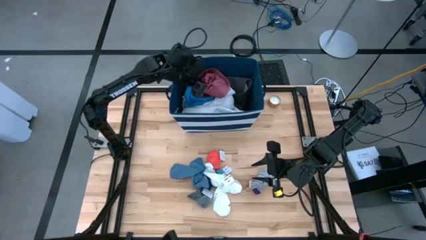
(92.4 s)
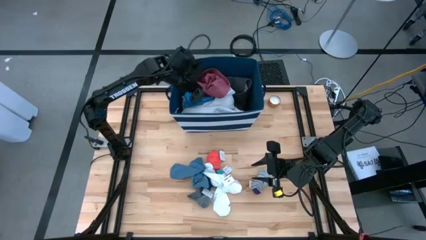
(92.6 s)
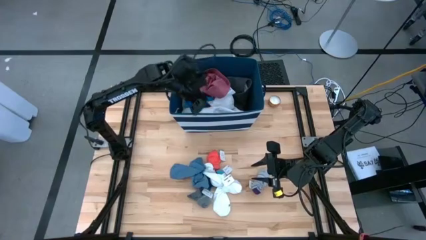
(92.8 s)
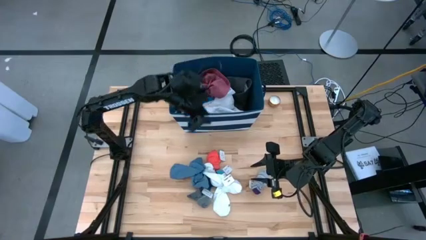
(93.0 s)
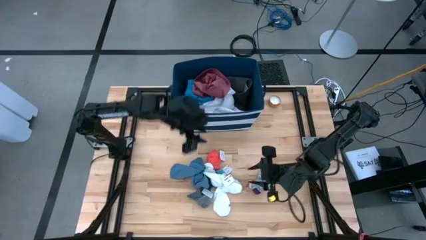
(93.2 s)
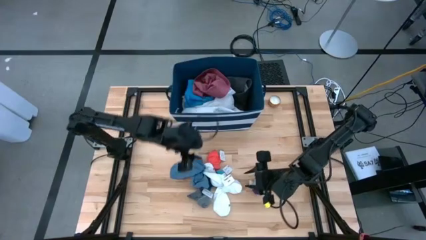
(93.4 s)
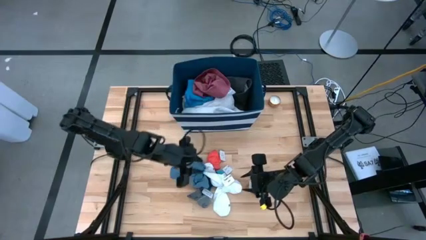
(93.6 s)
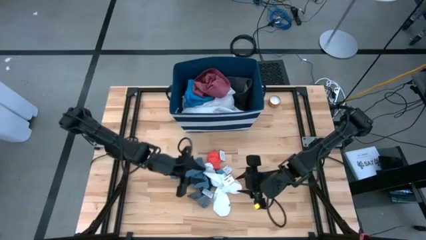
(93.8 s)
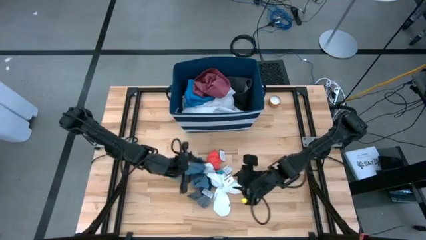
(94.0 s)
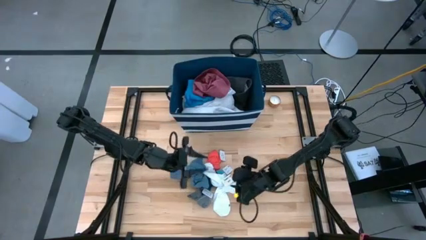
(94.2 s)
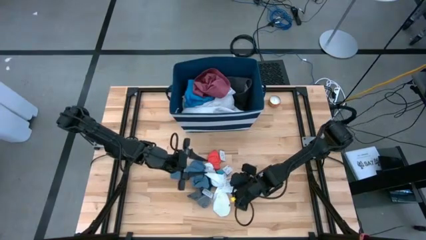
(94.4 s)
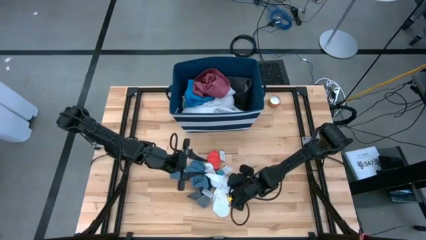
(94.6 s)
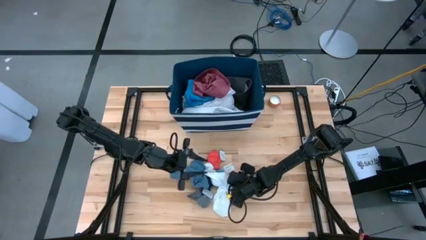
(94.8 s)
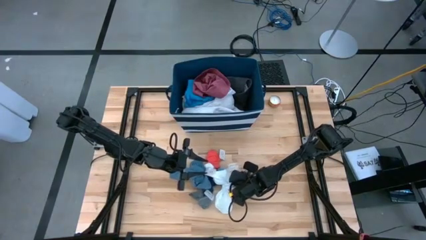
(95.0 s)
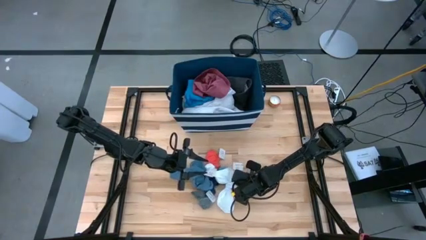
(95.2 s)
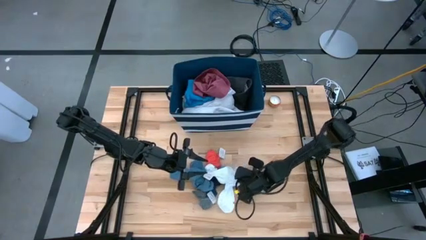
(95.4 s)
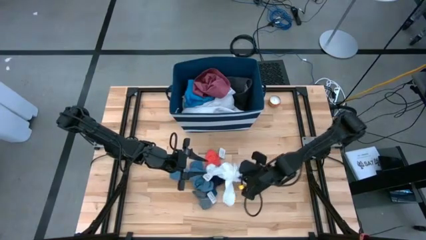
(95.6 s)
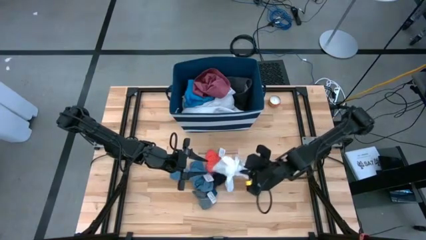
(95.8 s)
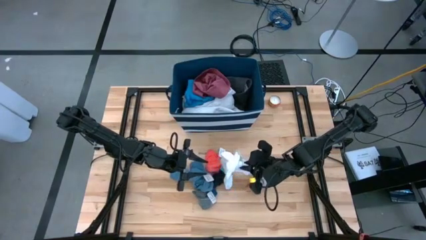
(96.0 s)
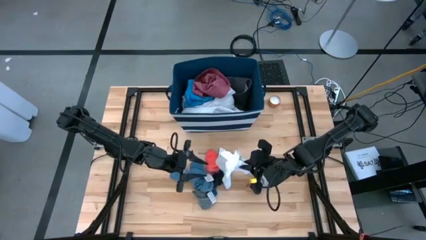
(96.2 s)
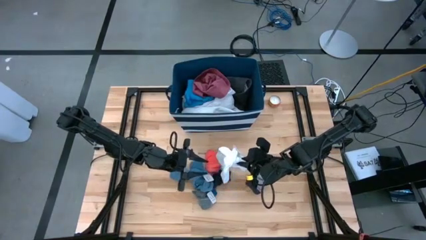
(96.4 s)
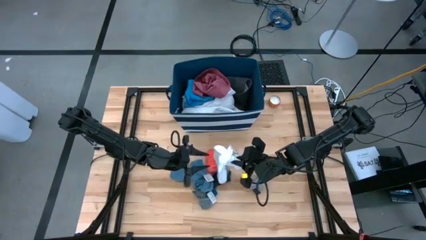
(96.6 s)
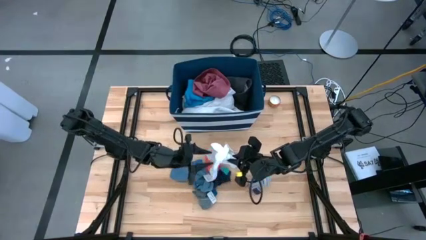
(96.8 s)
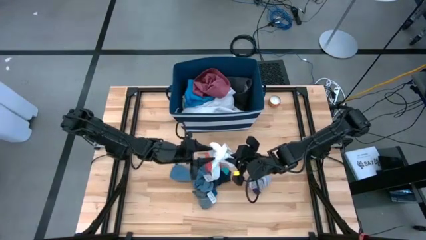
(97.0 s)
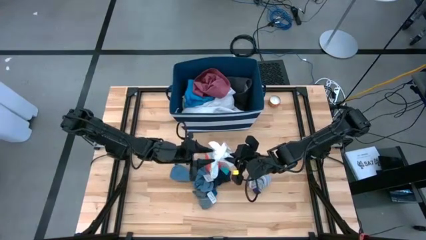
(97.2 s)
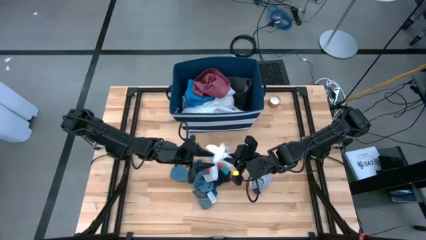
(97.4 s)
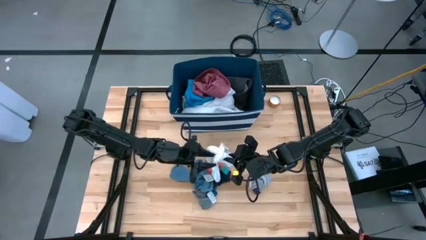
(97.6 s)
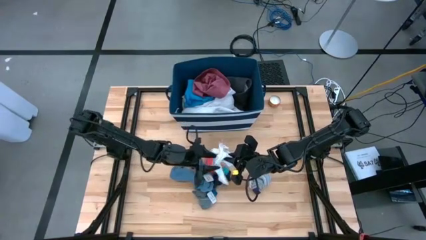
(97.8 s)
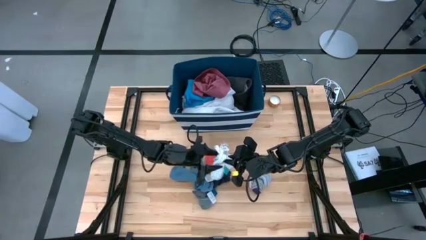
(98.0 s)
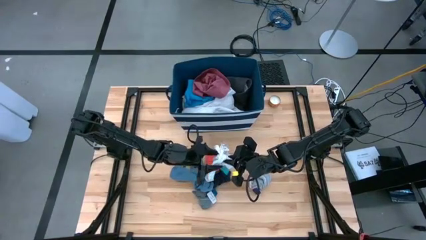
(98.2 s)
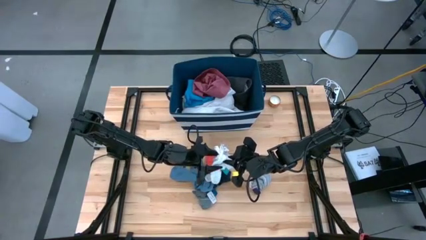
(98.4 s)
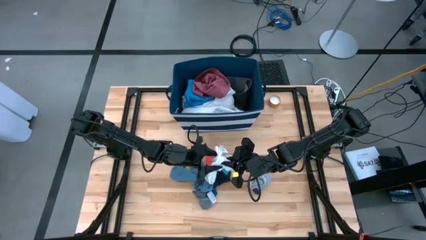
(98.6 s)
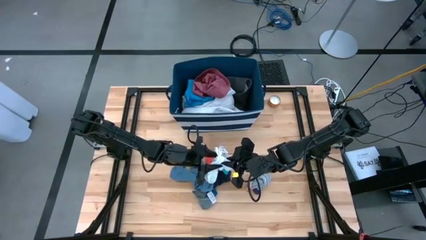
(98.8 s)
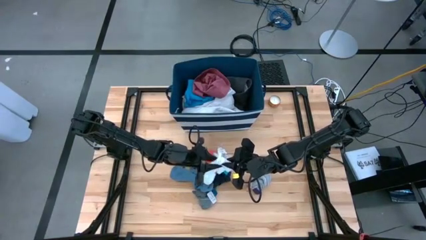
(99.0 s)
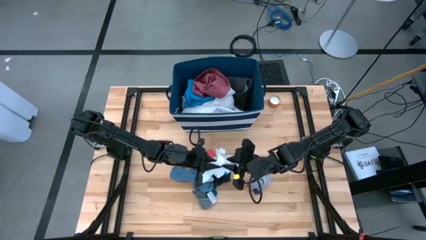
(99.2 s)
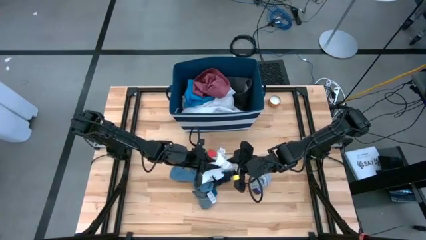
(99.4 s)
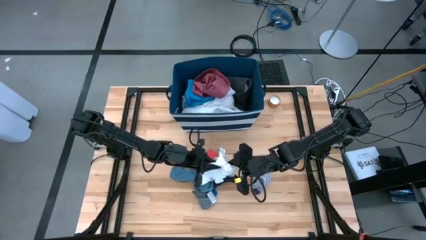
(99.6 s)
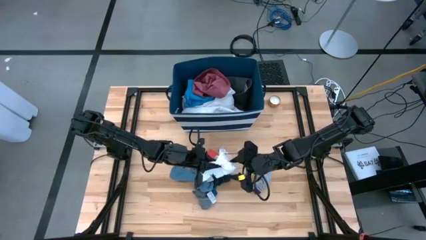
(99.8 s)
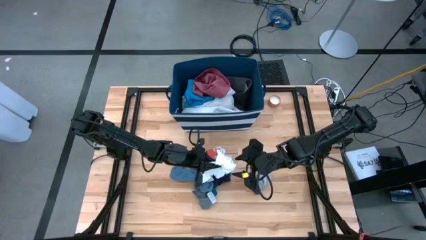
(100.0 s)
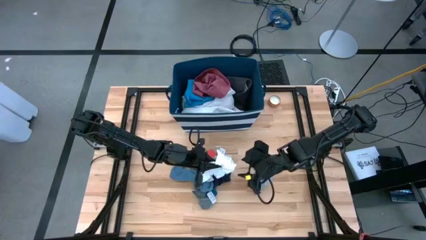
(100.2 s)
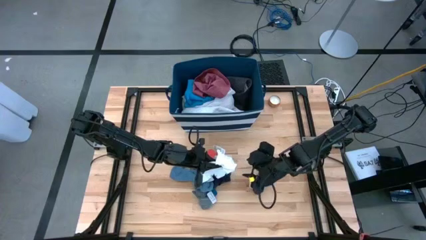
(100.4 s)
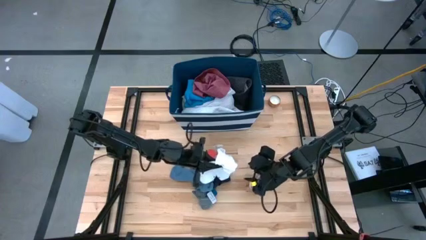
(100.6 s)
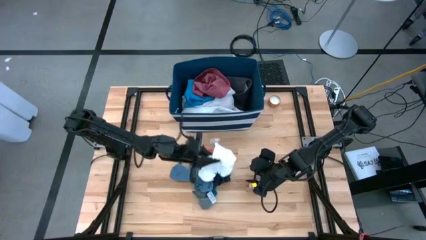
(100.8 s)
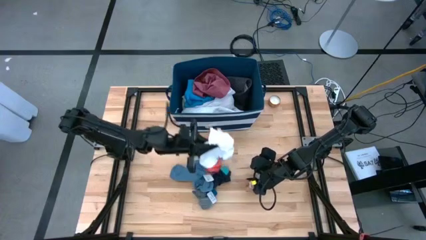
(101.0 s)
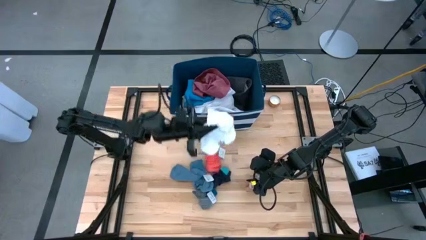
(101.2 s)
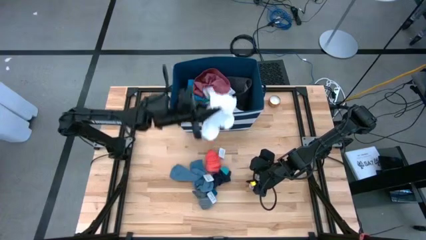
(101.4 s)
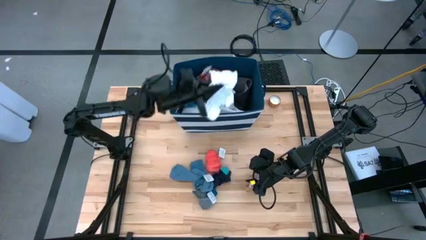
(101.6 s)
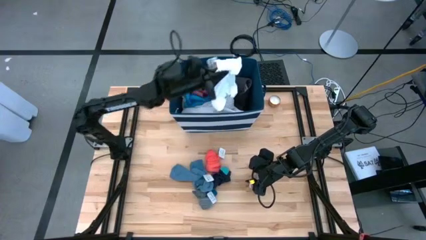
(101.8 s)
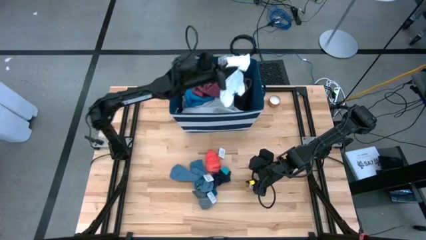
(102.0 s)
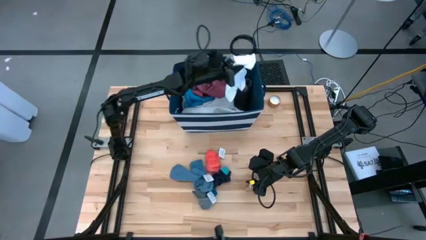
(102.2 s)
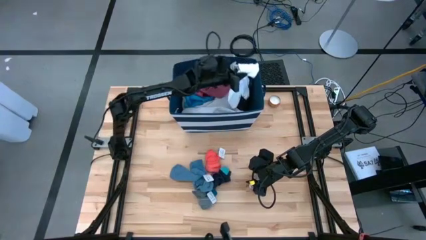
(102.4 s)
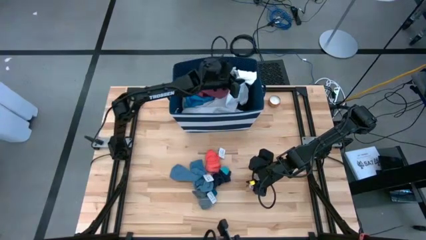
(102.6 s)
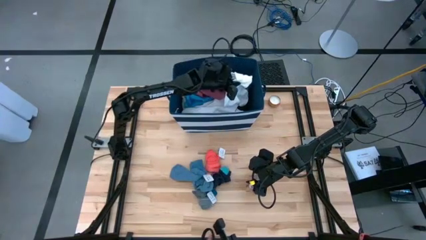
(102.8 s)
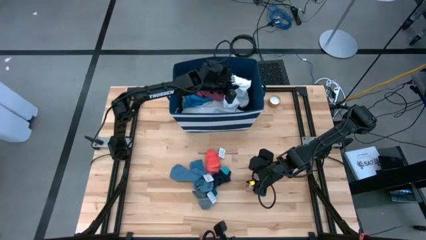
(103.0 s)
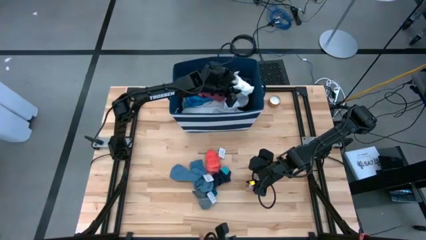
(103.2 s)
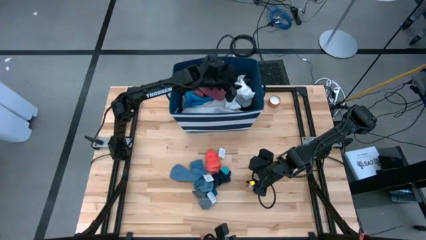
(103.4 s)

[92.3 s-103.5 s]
Task: Sort clothes
Put the white pair of socks into the blue laundry organizer

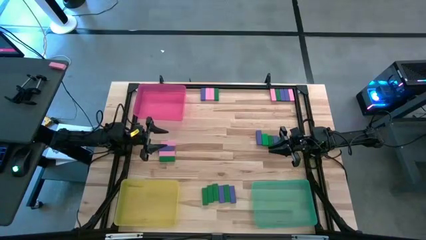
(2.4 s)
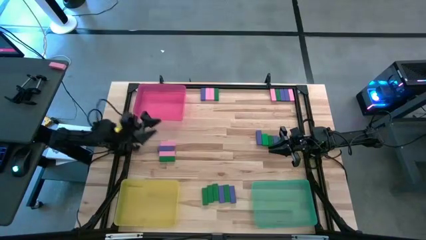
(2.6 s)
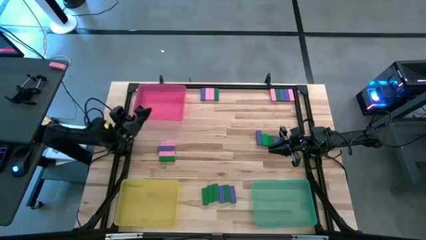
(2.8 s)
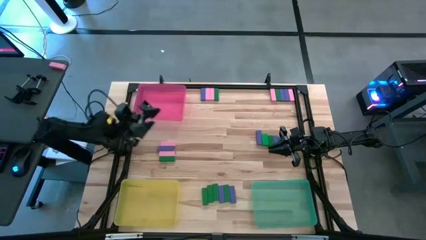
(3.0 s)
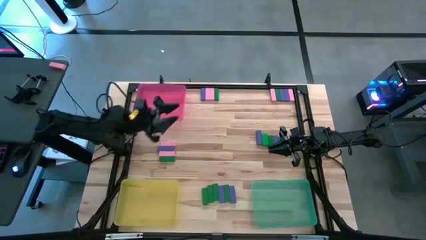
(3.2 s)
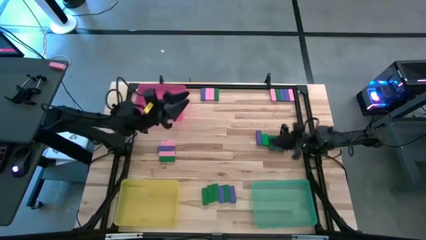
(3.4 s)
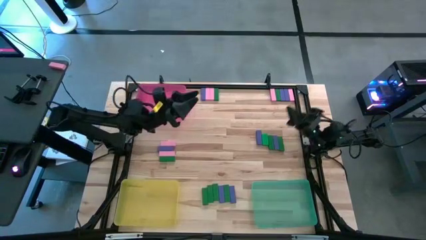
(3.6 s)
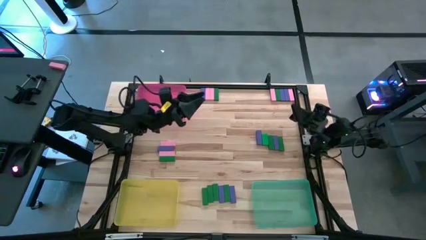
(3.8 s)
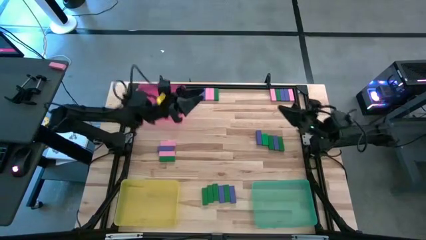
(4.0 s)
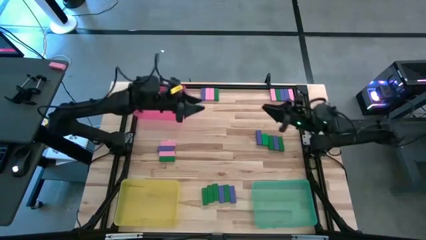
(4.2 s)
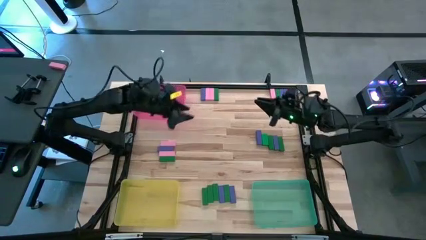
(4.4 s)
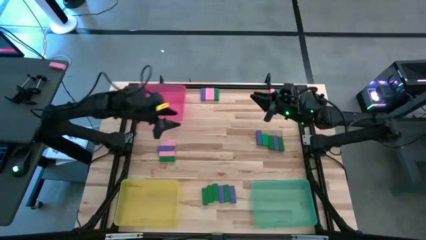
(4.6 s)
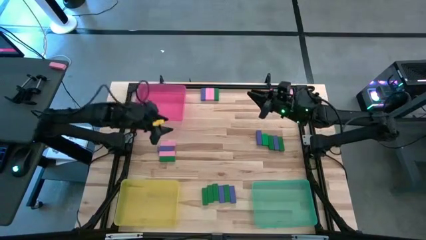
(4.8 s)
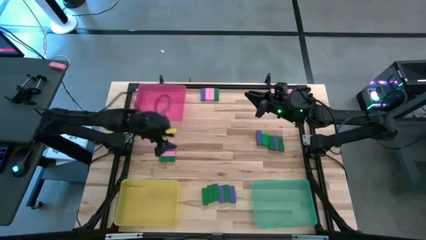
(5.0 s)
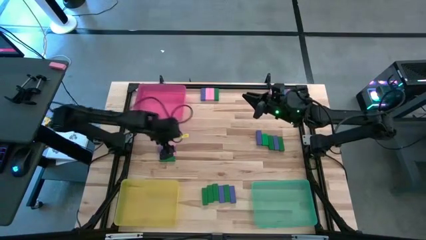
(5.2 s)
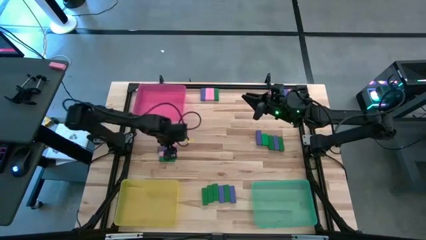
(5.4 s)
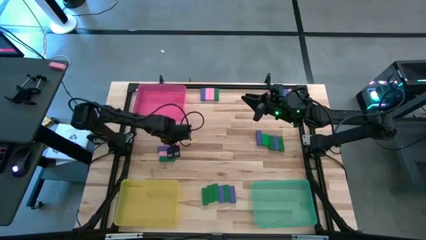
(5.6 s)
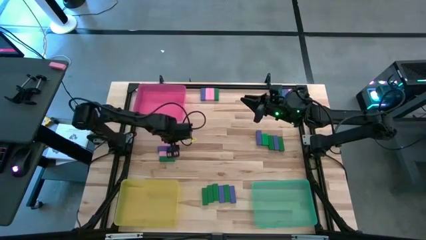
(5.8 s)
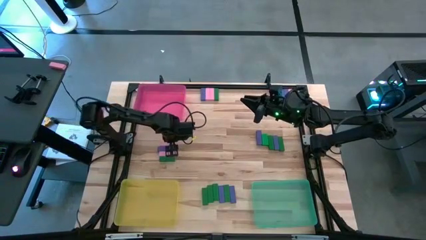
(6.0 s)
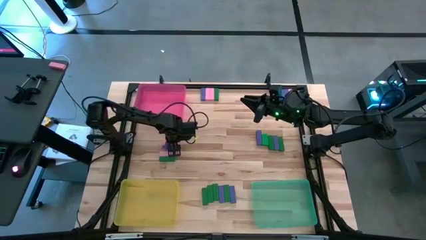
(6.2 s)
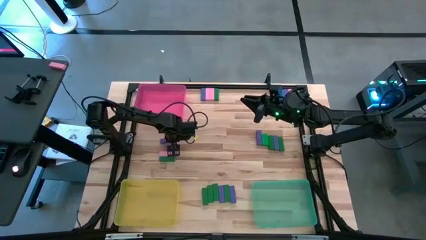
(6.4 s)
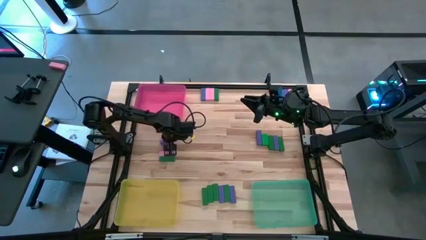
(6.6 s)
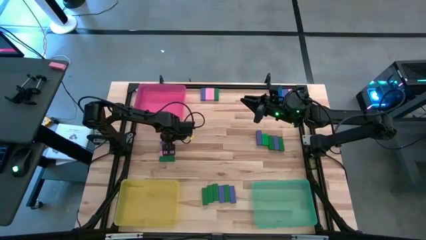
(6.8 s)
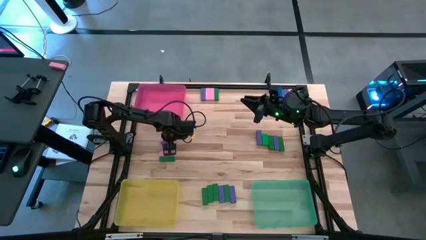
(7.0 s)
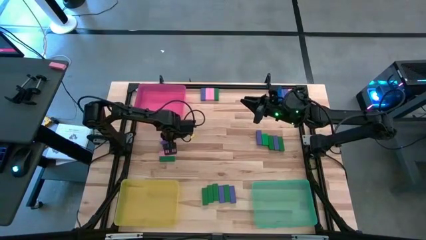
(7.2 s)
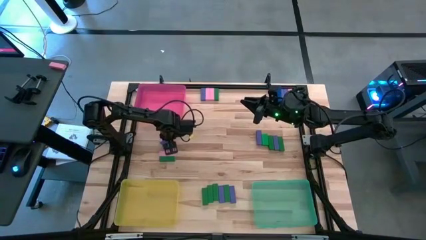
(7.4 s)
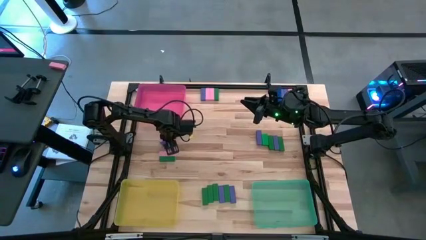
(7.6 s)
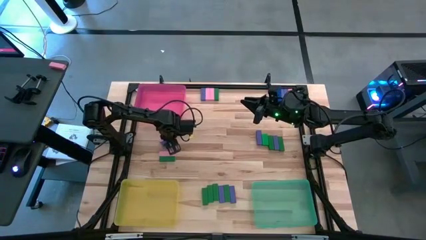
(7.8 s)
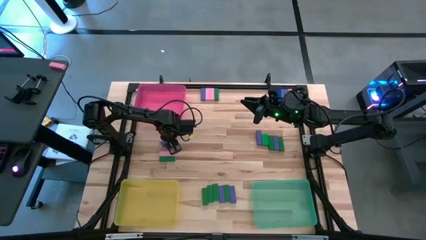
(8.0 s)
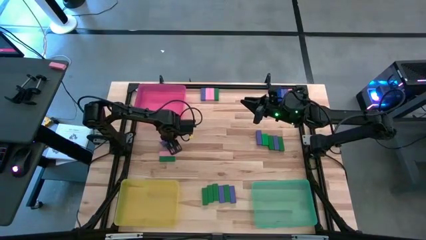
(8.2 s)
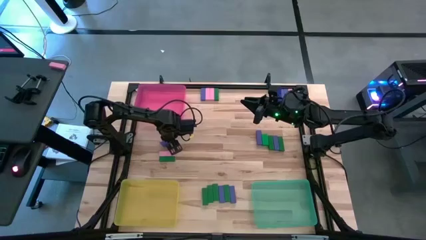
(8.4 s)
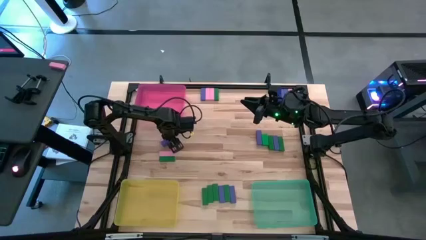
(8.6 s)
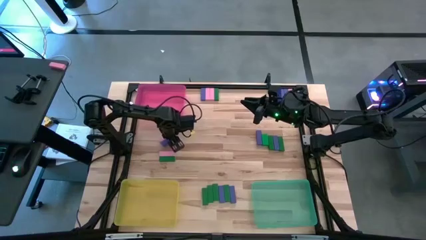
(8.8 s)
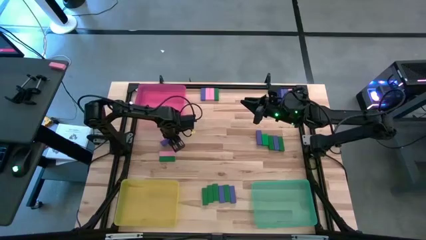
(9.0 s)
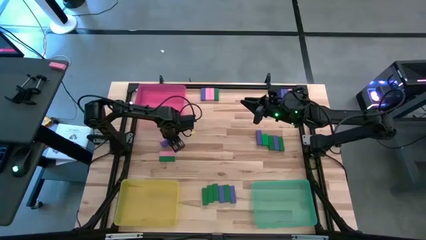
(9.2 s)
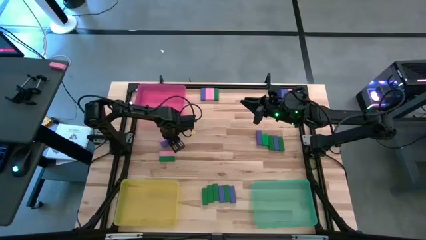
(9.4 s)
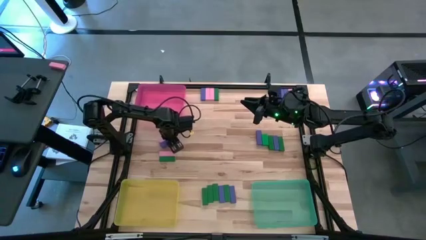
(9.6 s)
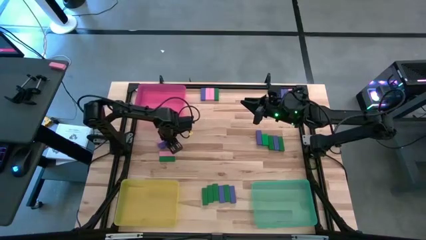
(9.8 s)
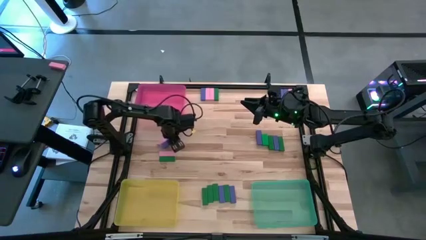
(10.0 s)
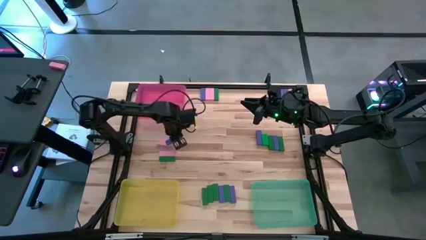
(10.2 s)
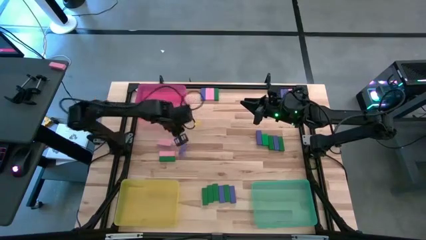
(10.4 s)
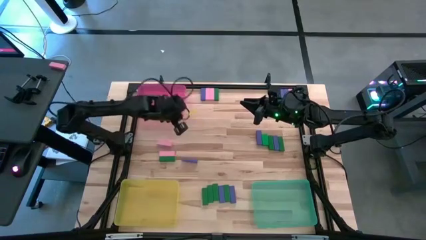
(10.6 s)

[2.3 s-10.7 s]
Task: Sort blocks
Put the violet block into the pink bin
